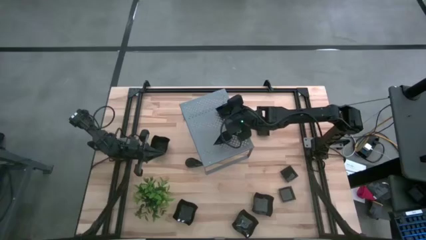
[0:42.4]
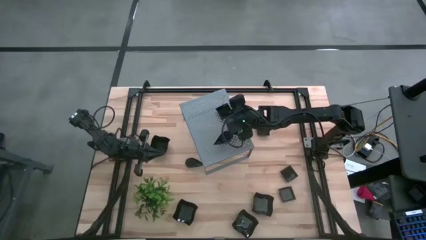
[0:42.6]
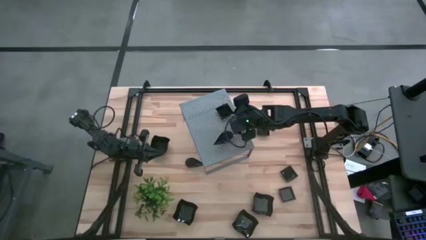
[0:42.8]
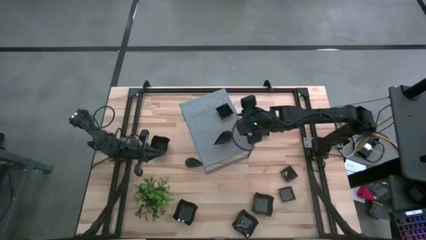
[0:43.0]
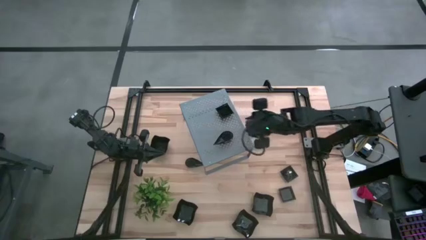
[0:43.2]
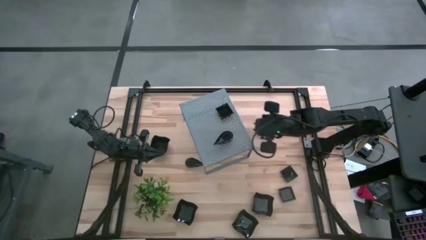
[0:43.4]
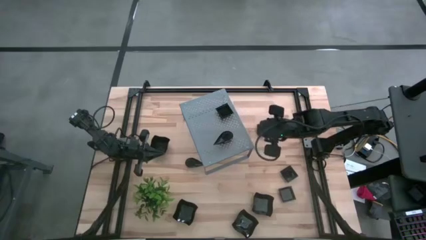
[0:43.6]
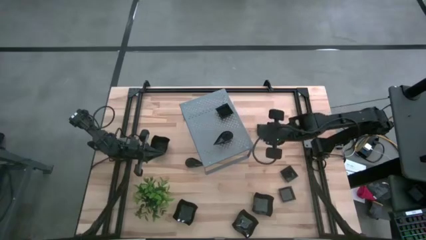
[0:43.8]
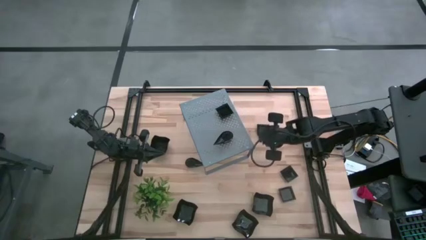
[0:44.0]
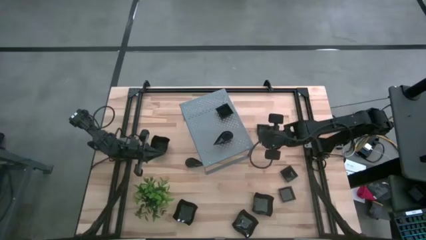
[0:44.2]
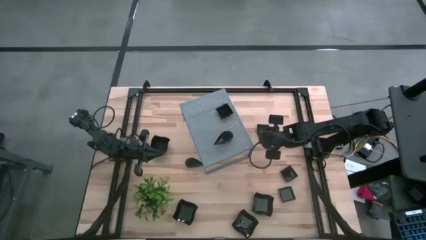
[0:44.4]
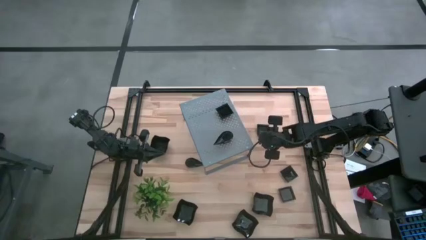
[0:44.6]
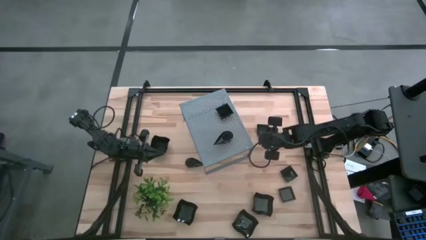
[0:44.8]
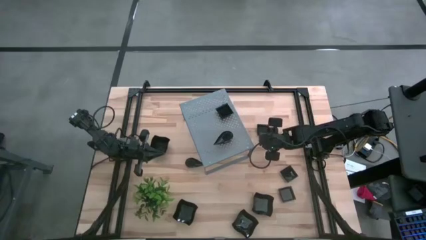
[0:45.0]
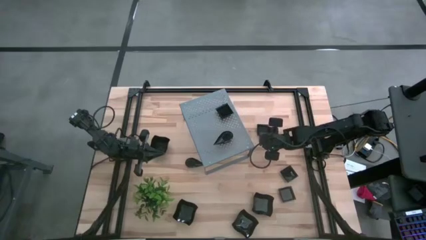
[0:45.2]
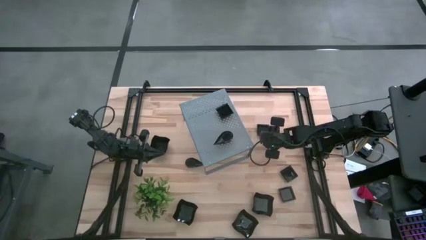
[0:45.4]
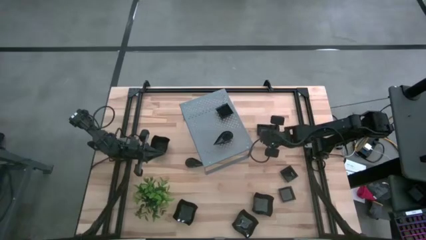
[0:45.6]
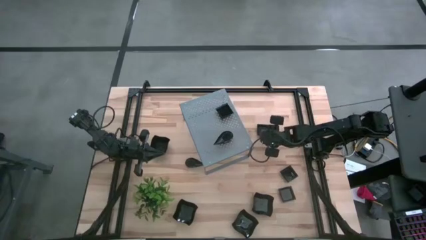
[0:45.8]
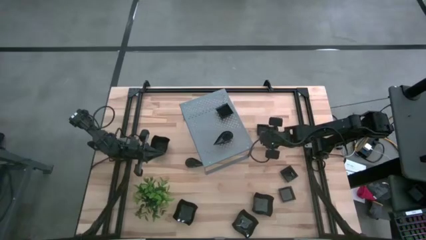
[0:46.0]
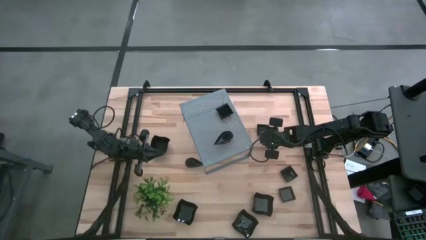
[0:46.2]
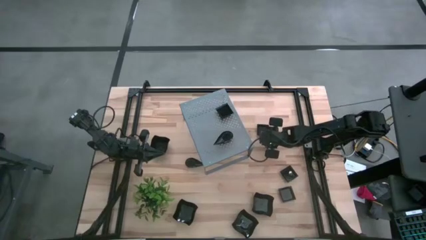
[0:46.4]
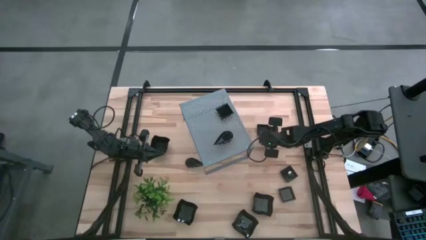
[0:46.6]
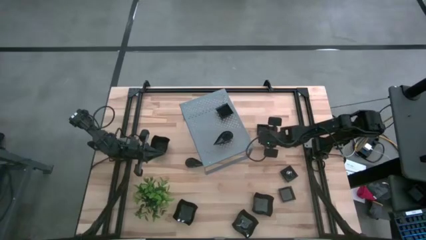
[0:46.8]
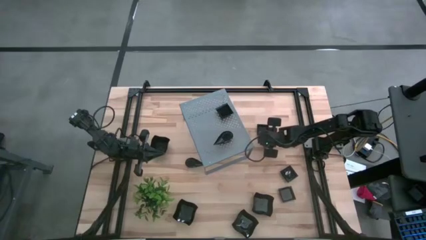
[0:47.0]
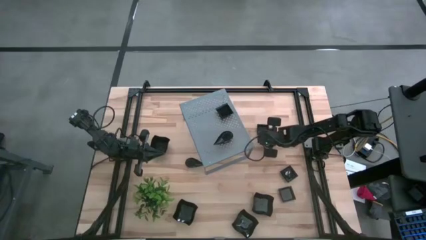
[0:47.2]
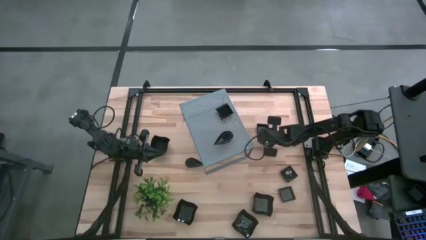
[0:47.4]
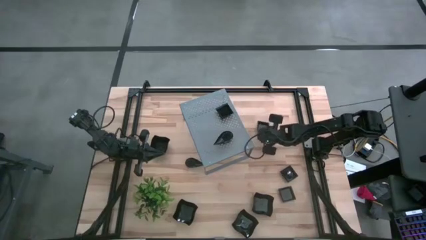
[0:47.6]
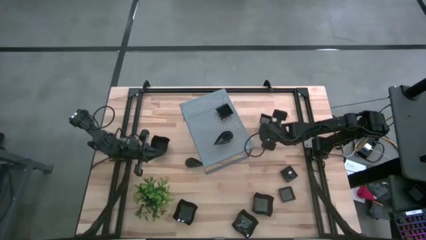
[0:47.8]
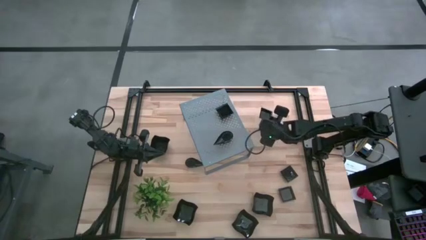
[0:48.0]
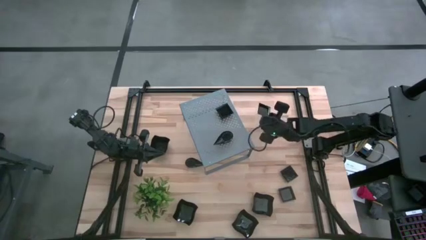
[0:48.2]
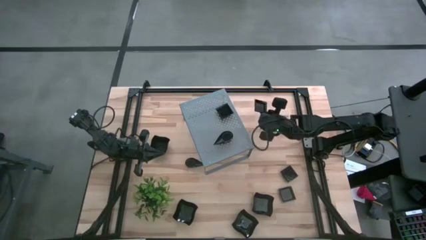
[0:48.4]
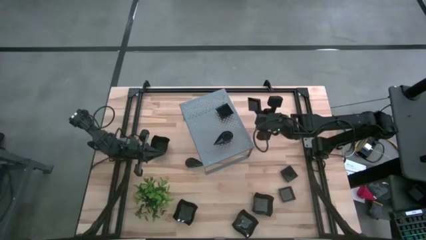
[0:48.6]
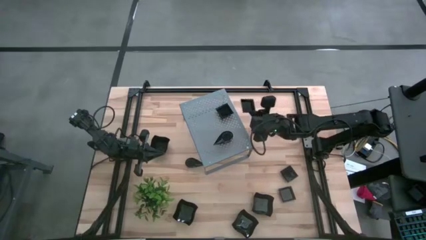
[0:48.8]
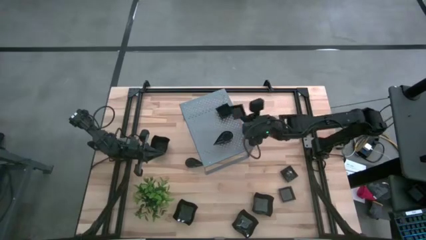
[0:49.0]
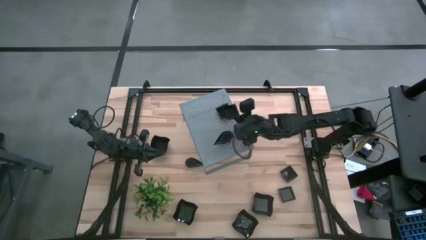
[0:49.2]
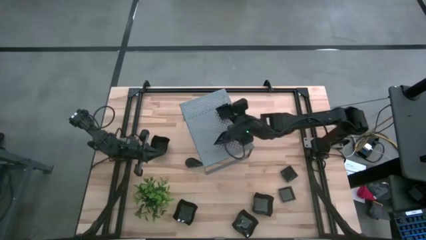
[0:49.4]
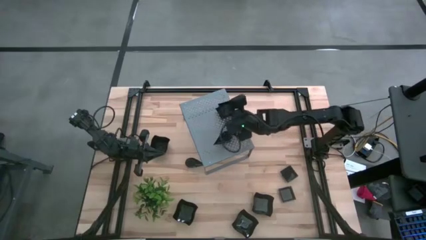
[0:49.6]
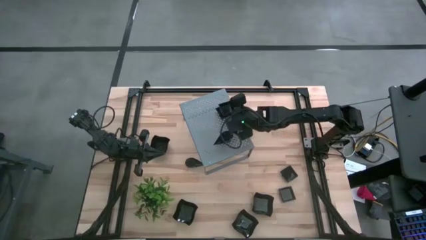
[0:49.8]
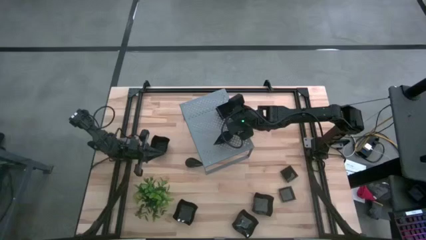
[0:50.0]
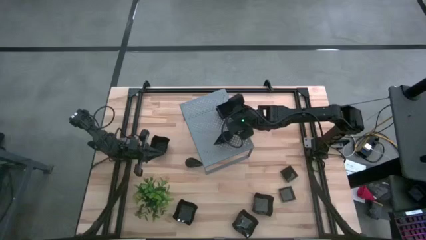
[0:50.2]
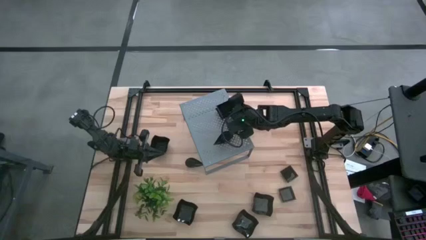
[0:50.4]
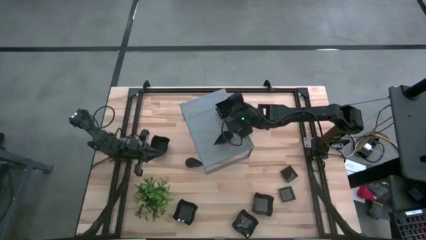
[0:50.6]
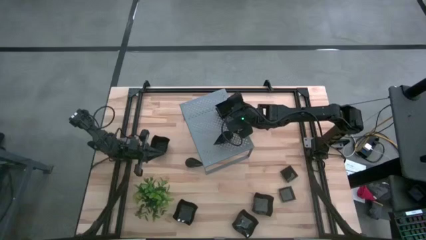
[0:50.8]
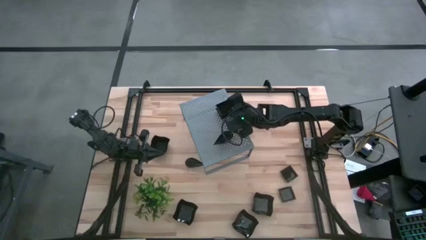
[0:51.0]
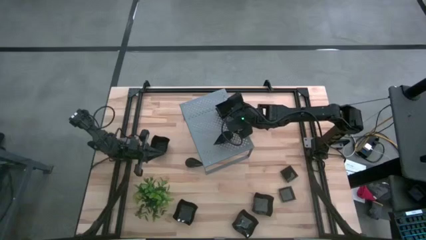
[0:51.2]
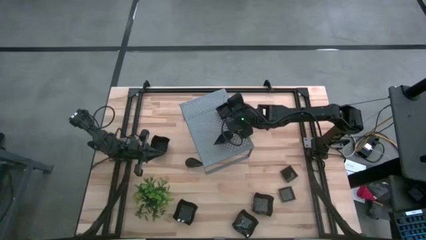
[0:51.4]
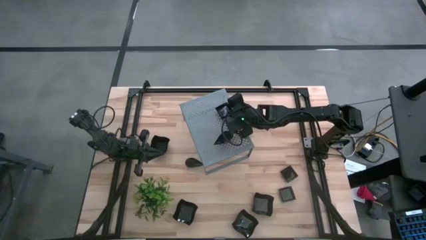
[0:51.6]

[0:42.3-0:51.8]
Task: Pick & Place Mini shaped plates
Stack the square plate on top of the square plate on the shelf

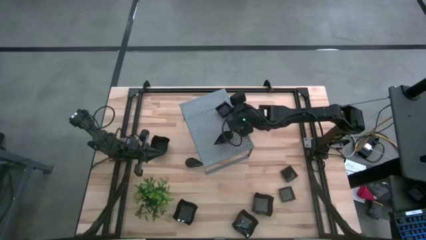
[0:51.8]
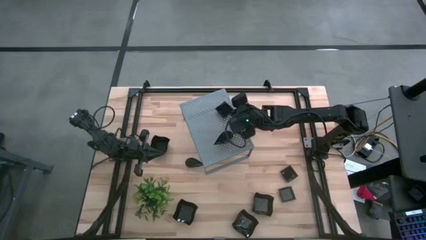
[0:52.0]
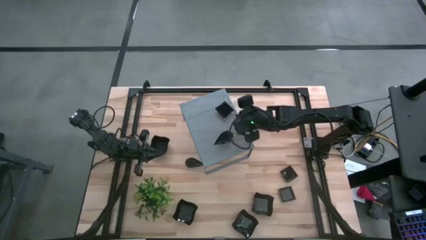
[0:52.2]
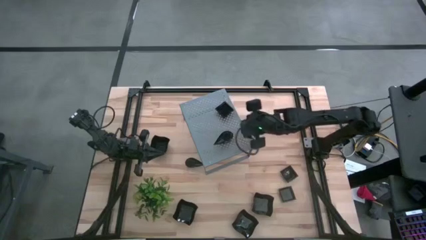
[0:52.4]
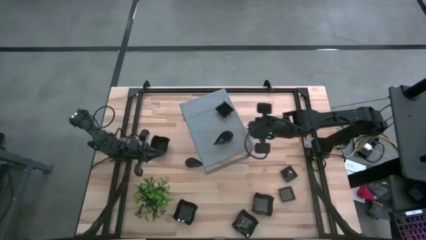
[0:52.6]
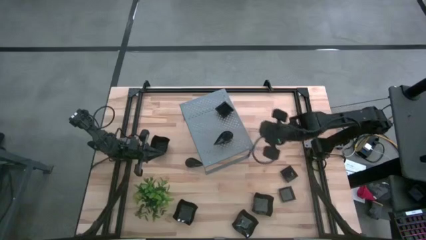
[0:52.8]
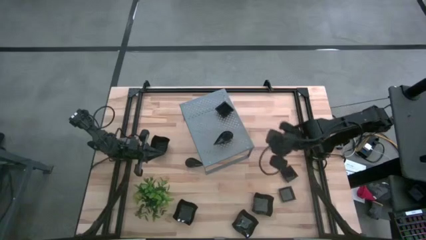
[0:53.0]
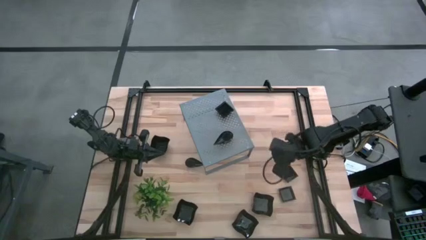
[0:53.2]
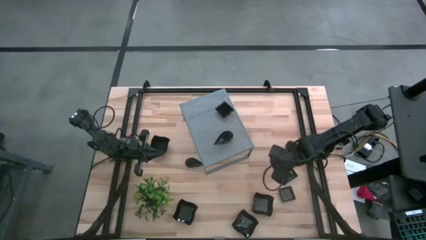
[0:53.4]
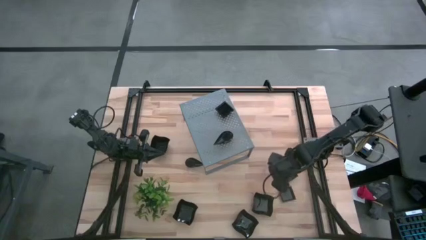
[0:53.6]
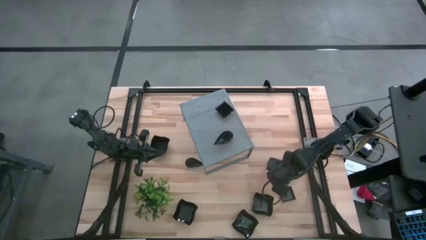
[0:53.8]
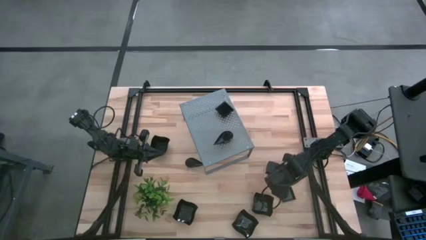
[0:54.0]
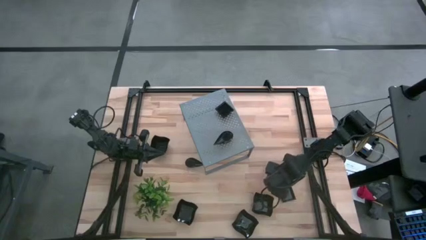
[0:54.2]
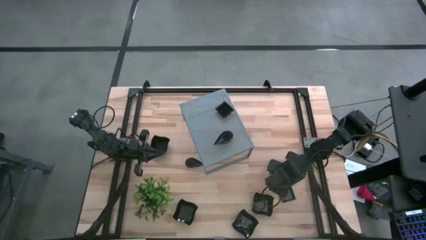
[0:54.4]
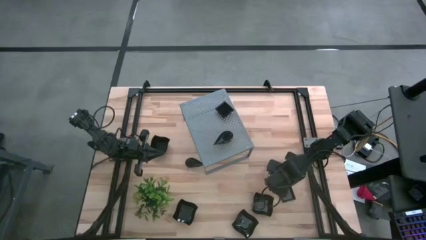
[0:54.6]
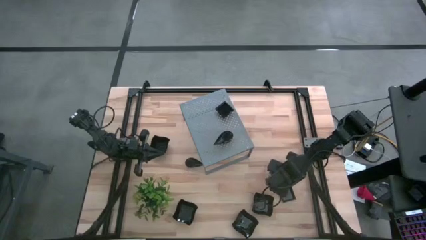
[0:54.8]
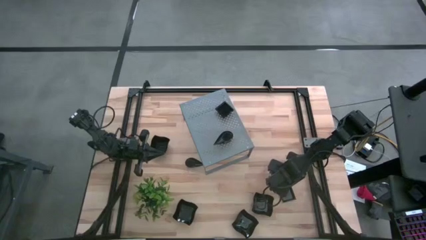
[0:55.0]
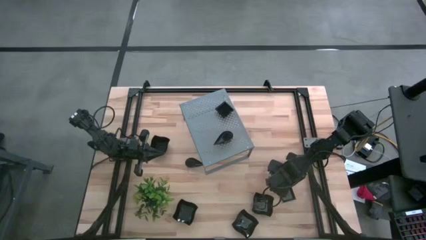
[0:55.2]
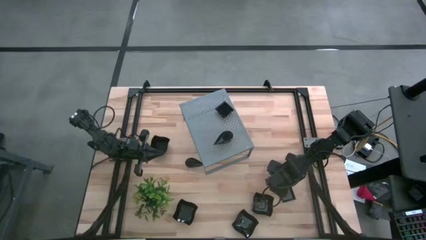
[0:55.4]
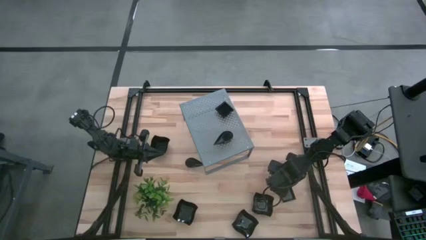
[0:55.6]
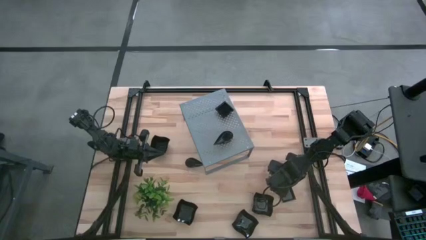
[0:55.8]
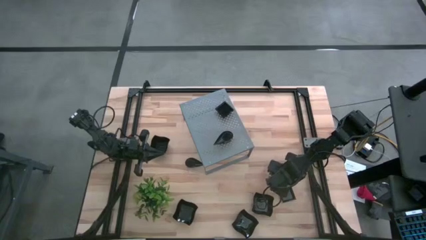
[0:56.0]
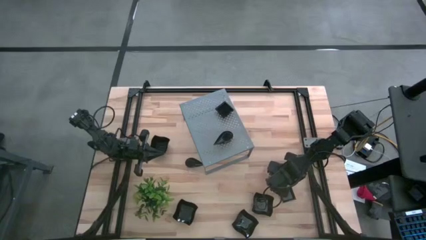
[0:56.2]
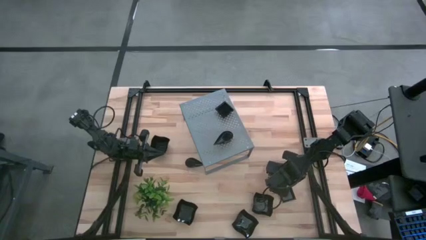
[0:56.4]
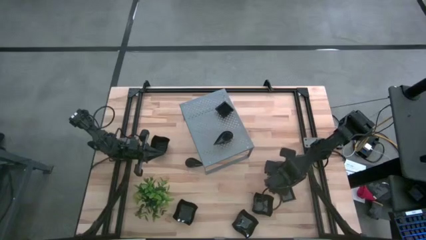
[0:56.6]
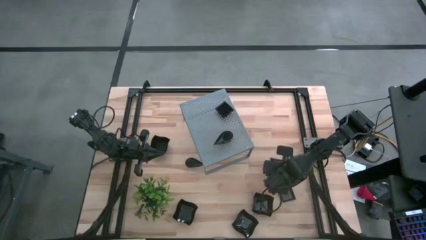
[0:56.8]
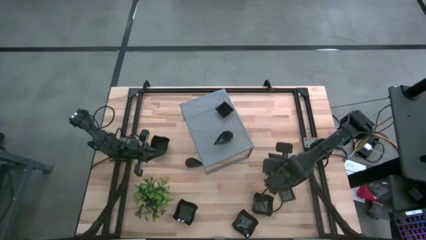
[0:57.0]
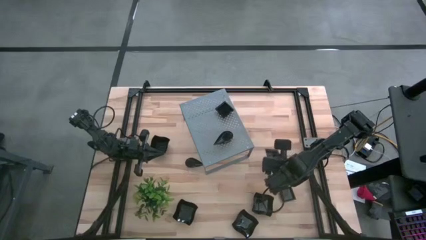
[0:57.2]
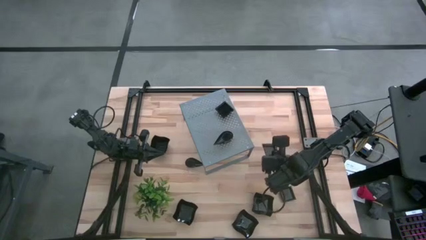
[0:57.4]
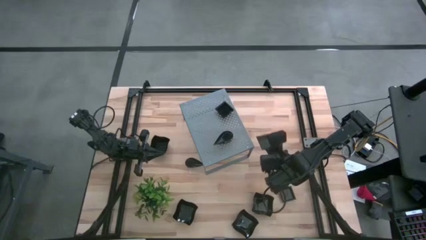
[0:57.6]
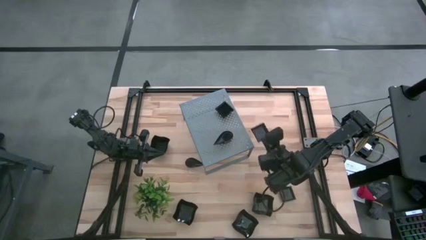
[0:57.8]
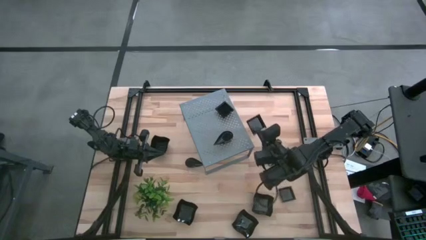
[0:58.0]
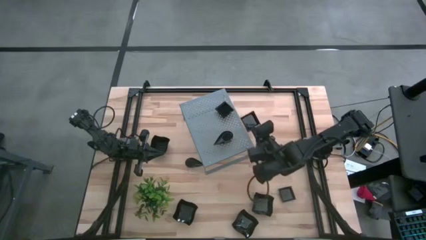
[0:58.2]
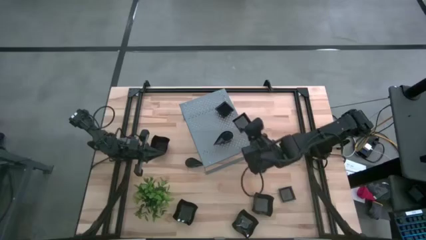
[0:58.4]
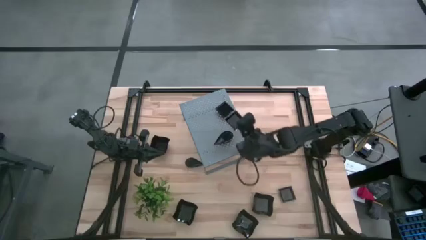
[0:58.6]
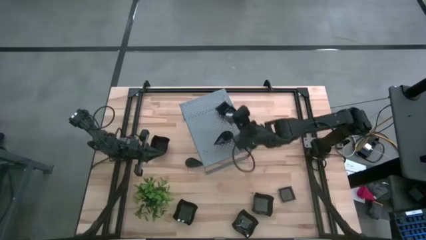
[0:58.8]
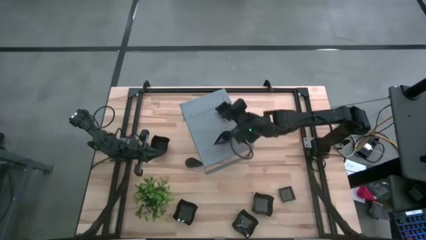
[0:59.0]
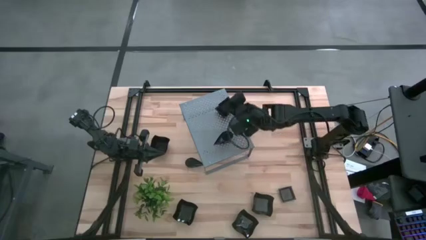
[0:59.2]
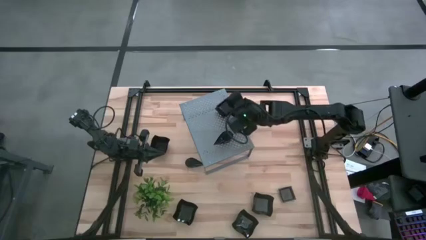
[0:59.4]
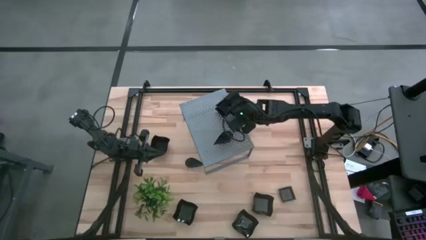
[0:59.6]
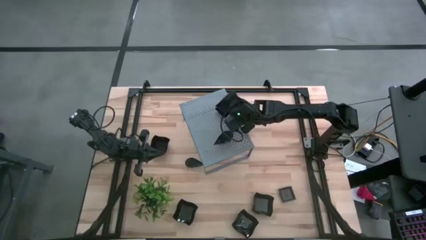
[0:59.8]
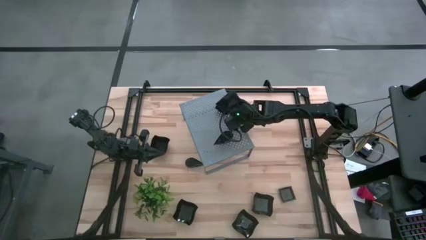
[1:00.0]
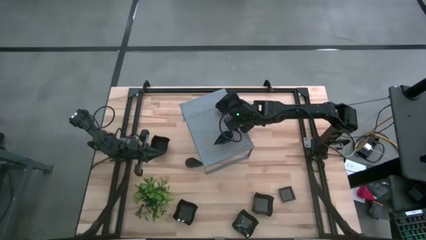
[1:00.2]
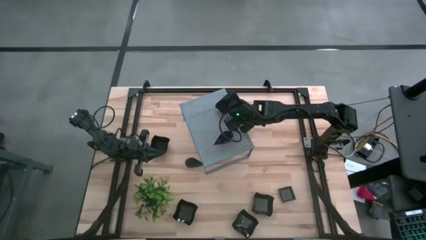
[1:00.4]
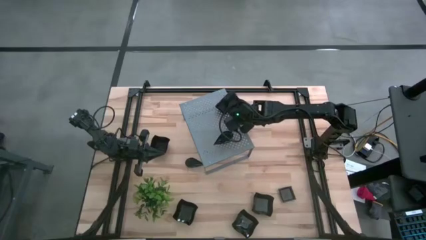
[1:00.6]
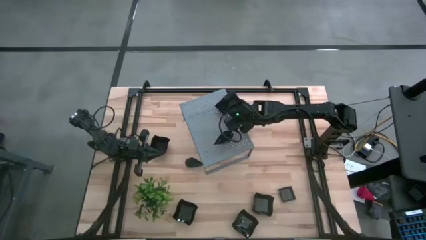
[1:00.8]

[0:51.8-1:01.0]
Stack the square plate on top of the square plate on the shelf
